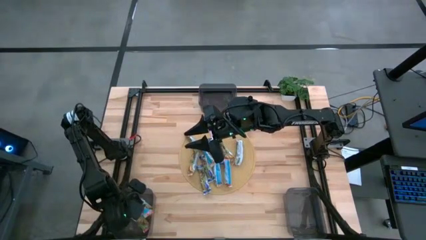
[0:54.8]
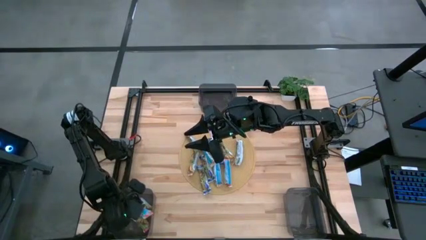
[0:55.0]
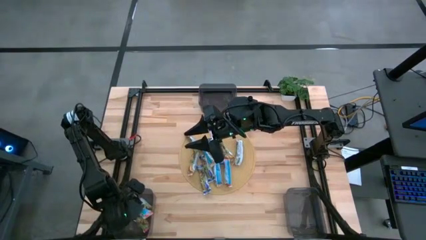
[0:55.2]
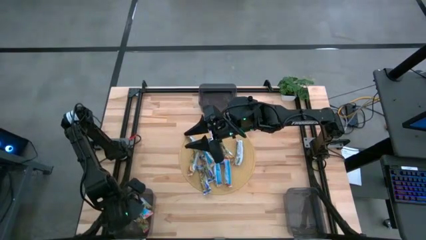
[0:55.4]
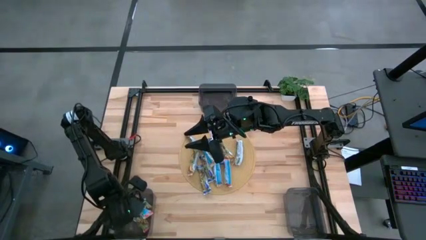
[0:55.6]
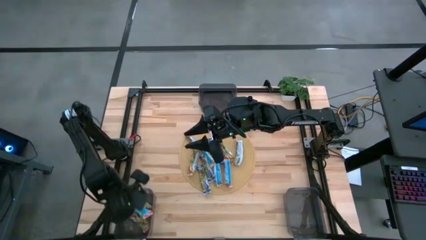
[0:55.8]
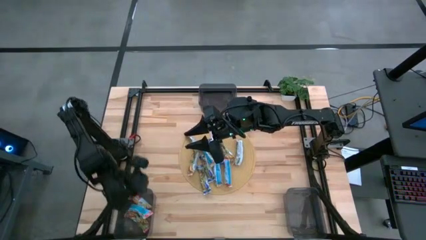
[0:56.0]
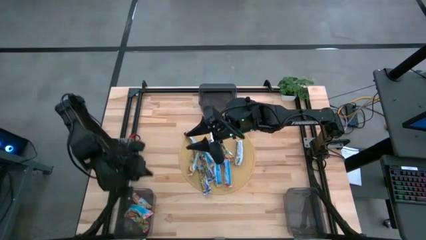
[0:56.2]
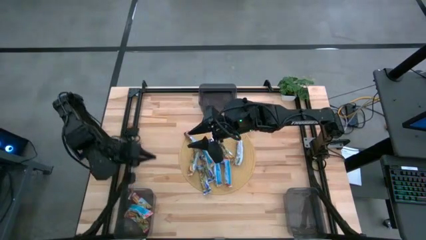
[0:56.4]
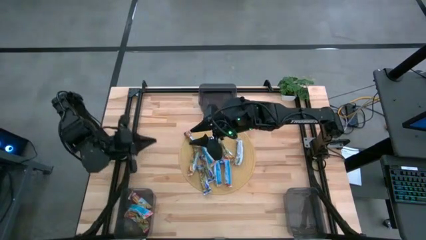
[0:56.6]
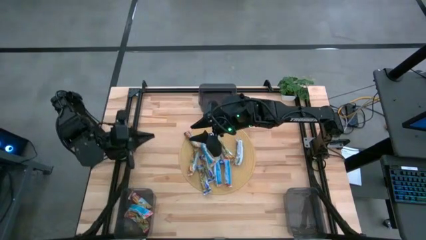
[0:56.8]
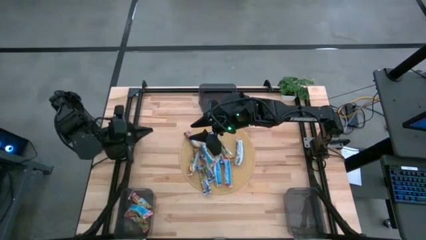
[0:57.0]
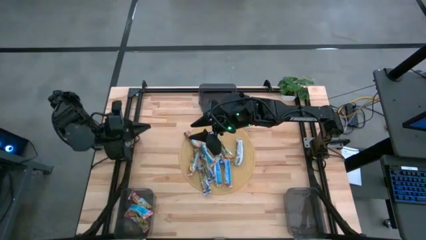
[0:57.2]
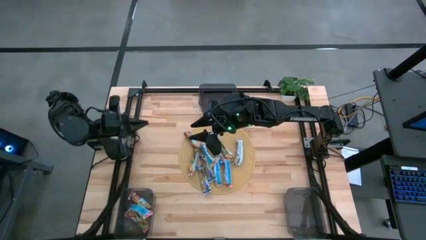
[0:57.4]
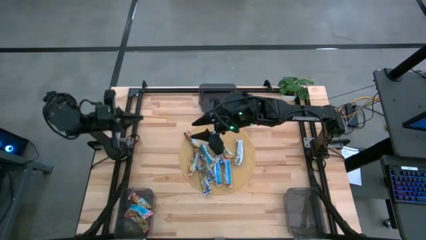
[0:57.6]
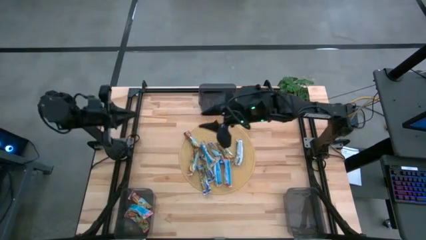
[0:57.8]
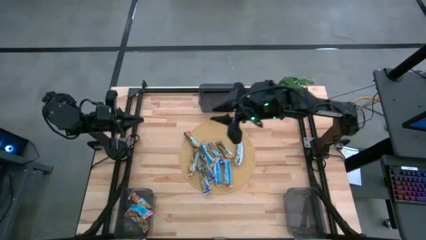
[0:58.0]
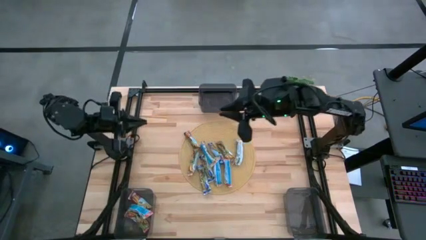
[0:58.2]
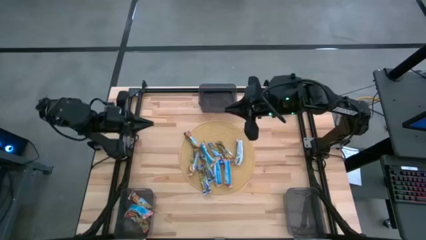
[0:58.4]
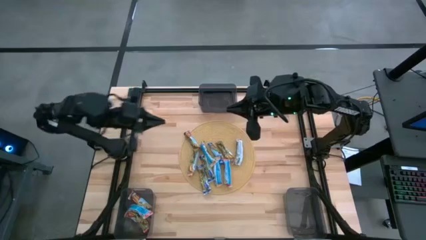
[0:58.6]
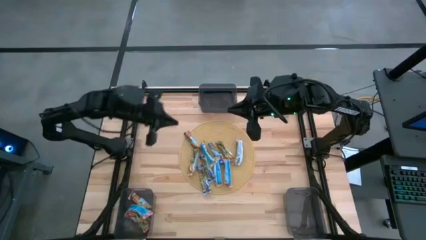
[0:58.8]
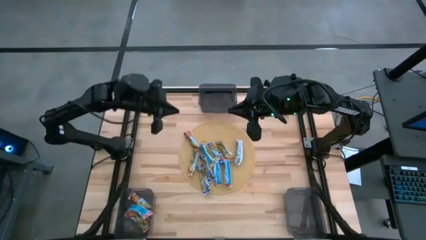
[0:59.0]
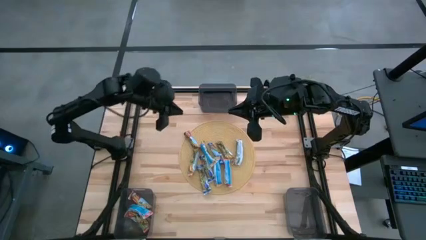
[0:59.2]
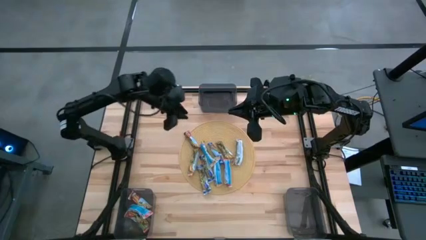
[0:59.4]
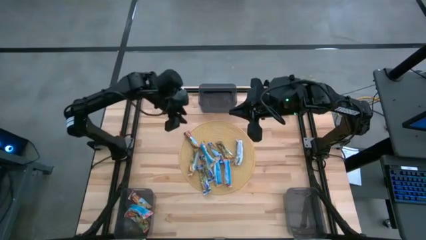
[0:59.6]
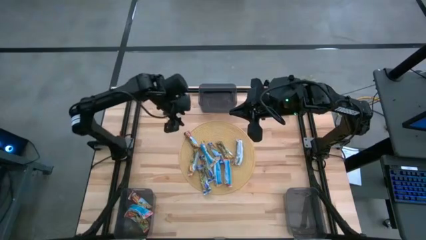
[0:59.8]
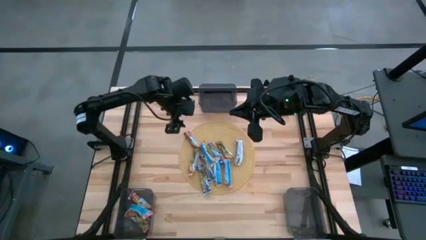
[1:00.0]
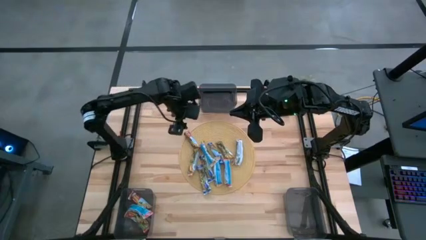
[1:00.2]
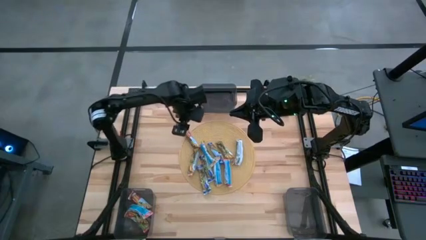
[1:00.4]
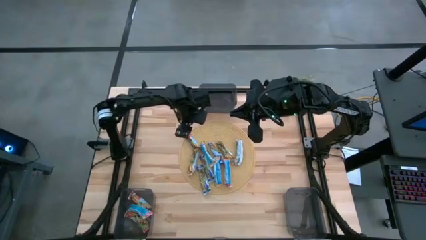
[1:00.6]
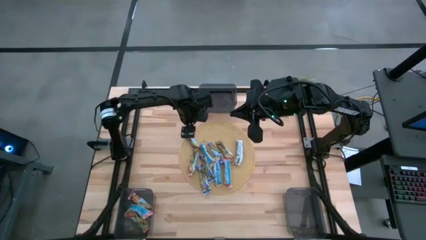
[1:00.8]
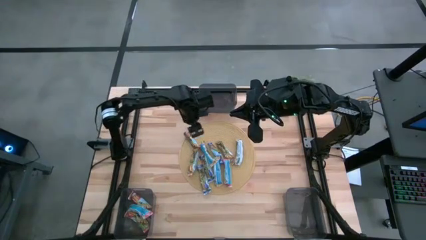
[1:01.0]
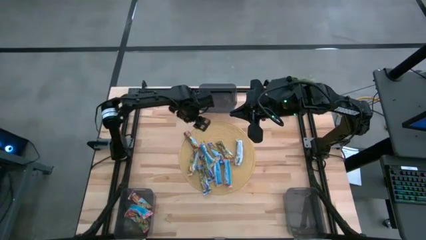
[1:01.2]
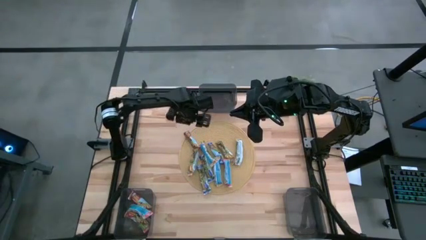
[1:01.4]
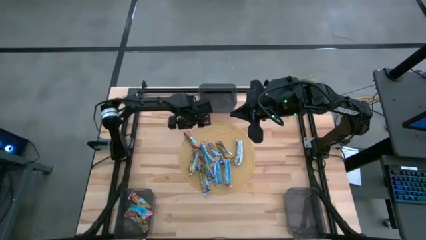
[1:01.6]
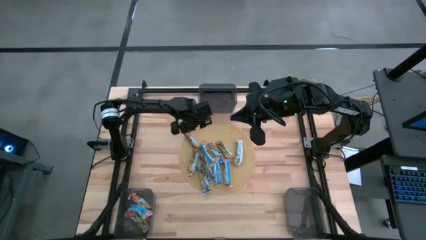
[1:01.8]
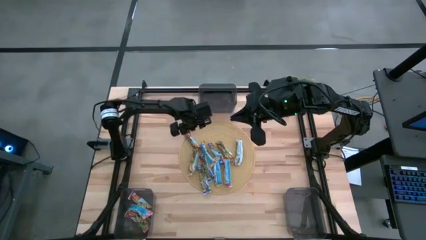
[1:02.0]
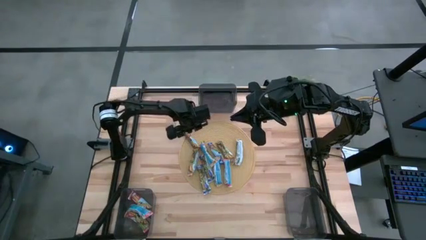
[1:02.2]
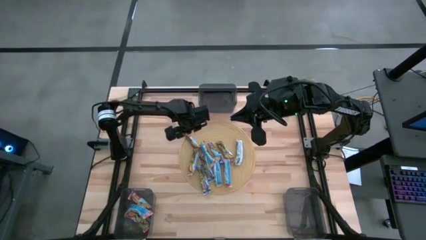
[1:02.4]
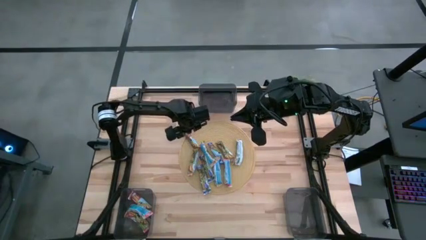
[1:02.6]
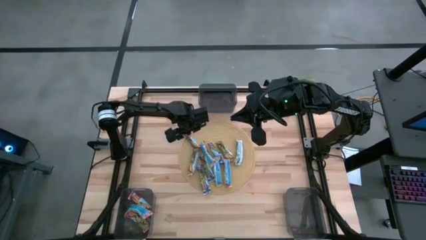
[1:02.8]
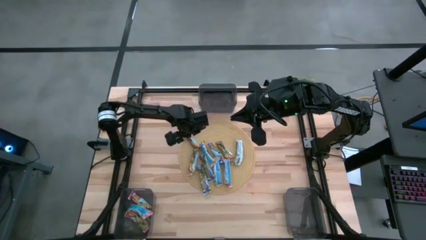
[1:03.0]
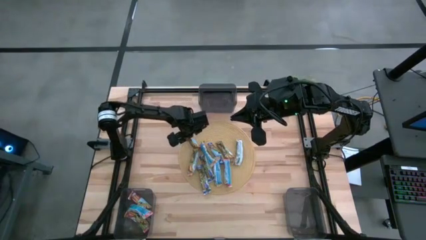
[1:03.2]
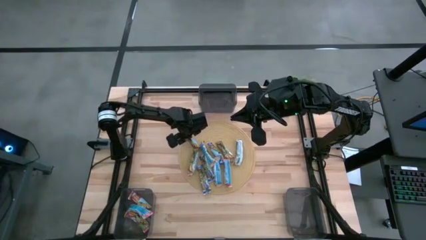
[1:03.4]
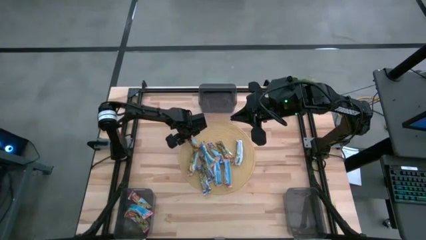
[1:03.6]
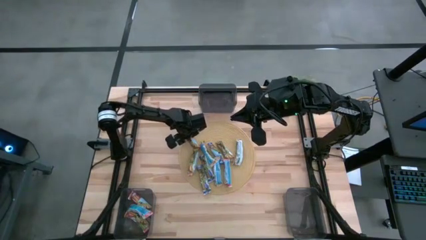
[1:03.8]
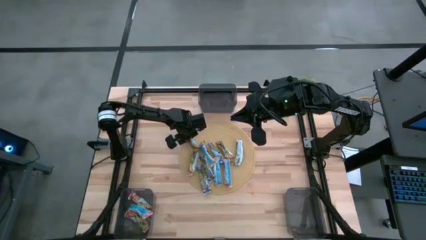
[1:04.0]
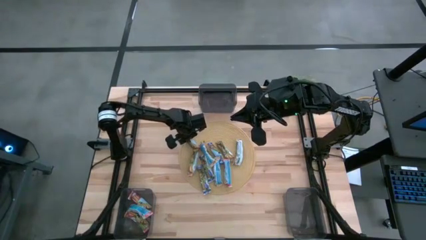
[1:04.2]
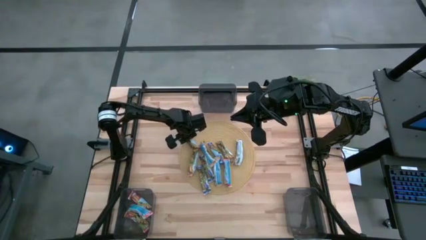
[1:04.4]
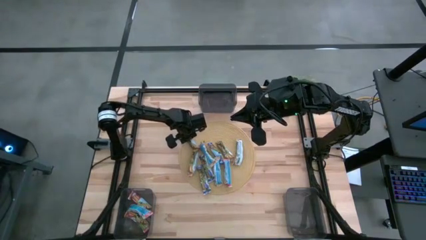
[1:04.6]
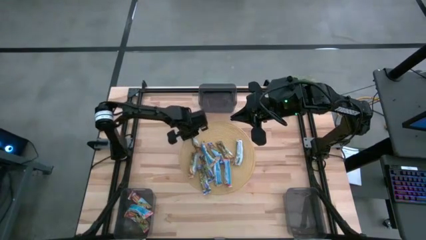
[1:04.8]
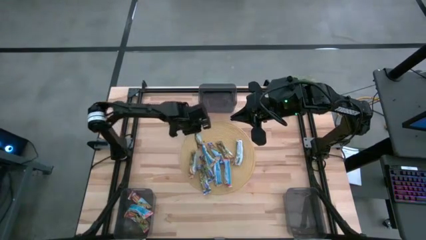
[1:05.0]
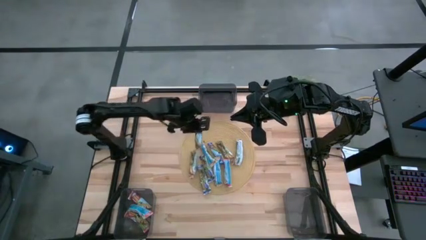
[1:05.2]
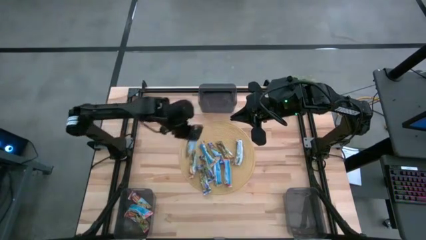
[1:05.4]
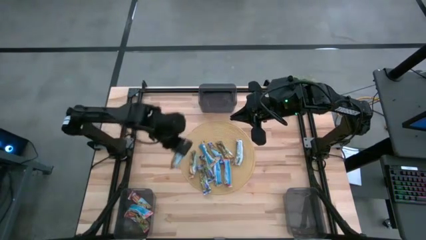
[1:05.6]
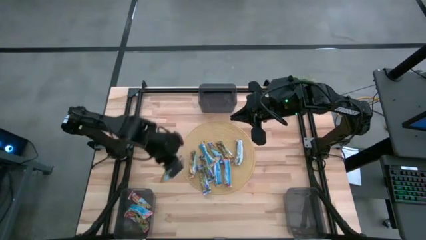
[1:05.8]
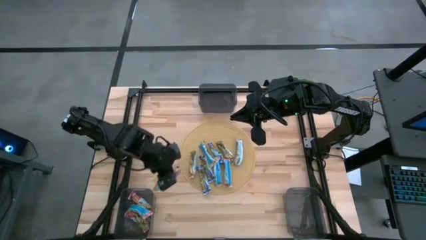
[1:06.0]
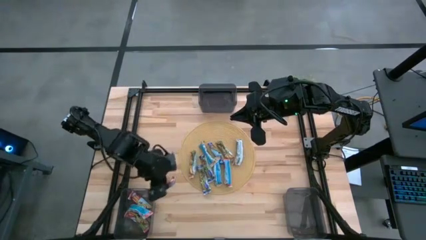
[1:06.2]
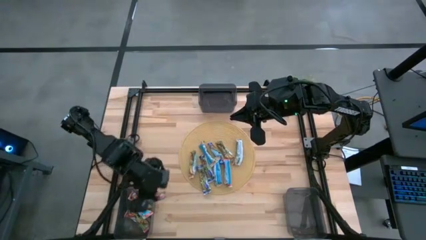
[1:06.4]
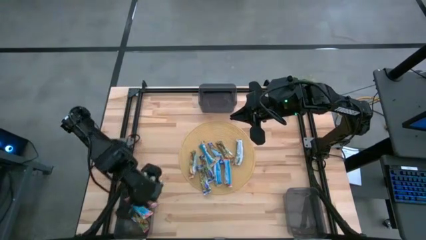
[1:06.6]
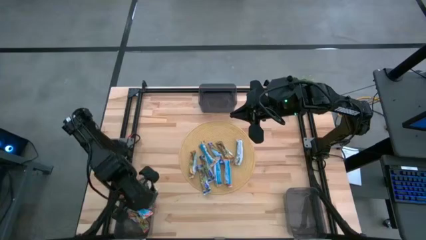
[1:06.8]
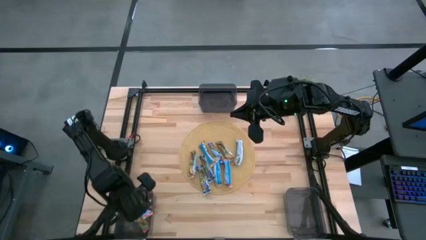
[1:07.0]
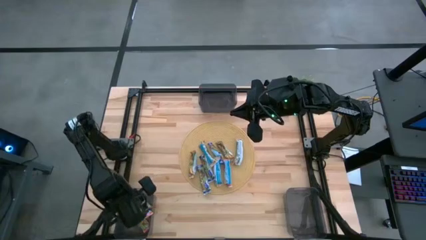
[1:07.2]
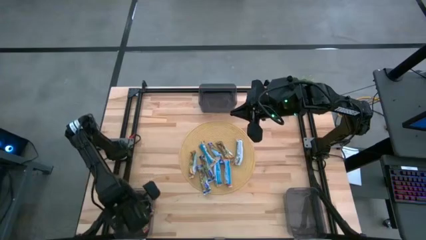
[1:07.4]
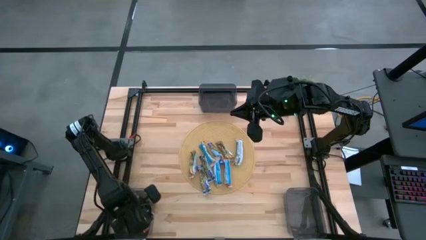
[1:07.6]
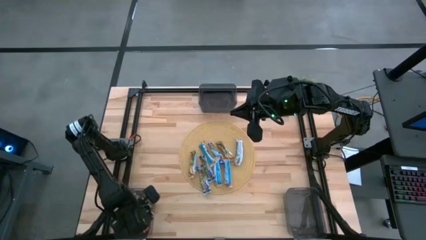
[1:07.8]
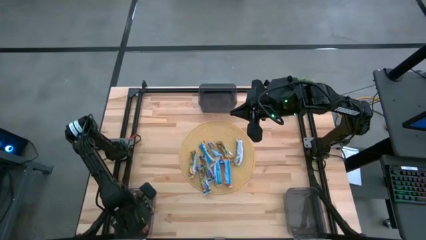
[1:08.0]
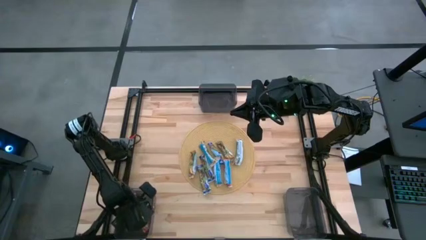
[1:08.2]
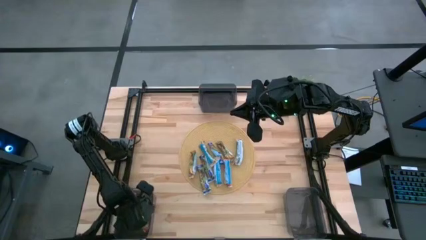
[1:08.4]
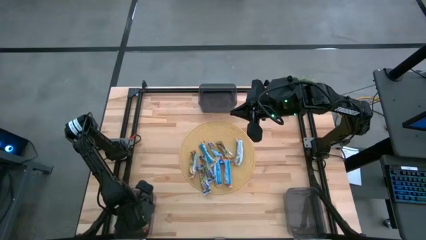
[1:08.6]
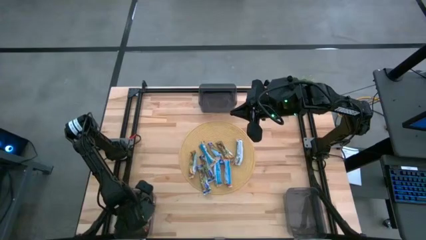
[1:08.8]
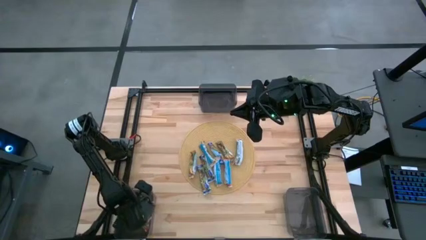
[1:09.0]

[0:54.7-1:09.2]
Task: Pick and place Granola Bars by type
Put the red granola bar into the left black bin

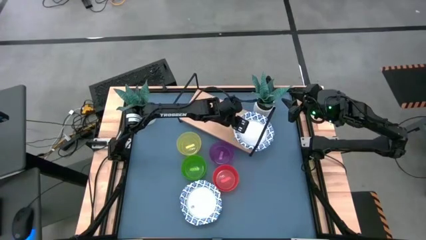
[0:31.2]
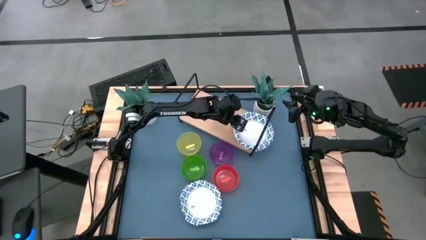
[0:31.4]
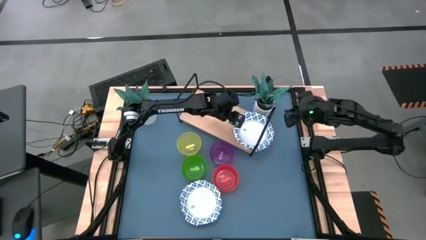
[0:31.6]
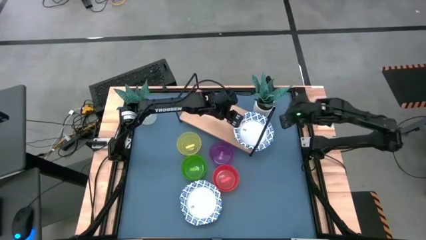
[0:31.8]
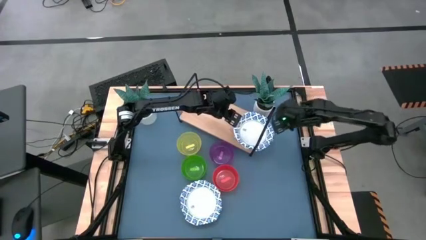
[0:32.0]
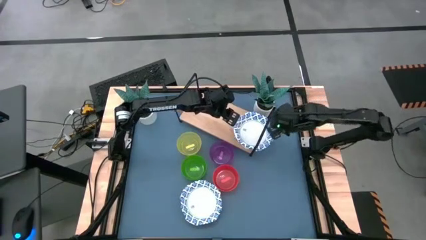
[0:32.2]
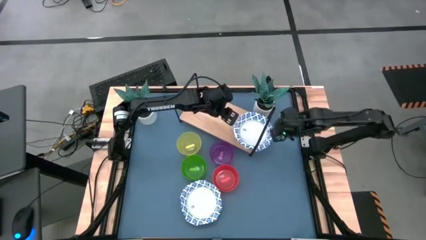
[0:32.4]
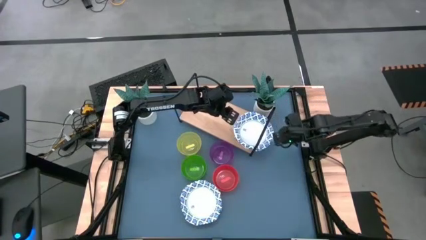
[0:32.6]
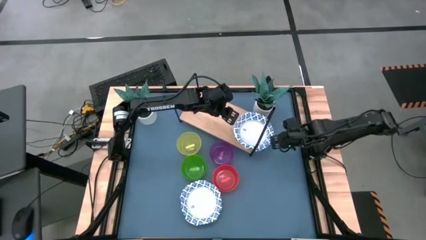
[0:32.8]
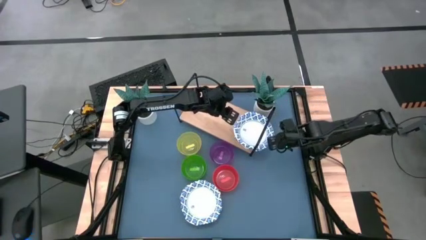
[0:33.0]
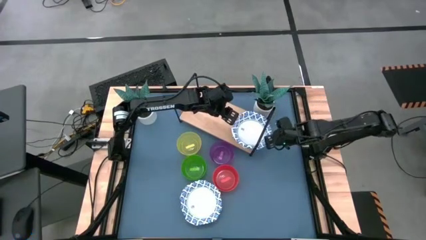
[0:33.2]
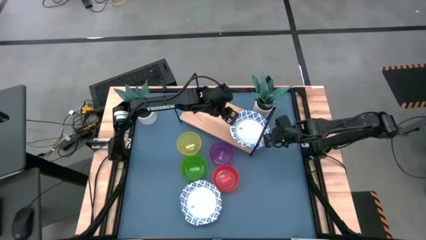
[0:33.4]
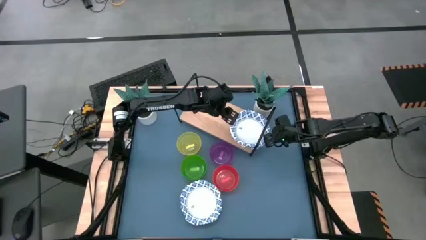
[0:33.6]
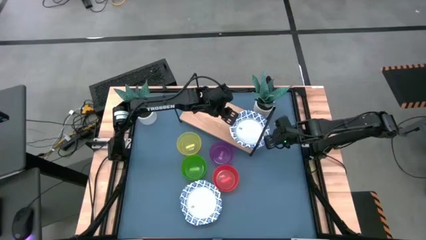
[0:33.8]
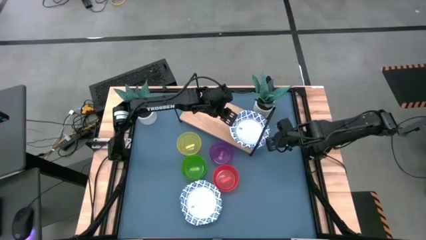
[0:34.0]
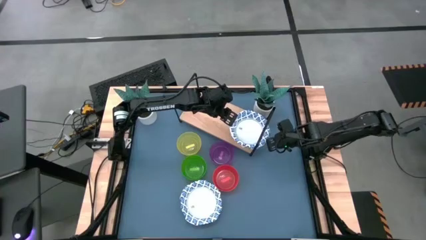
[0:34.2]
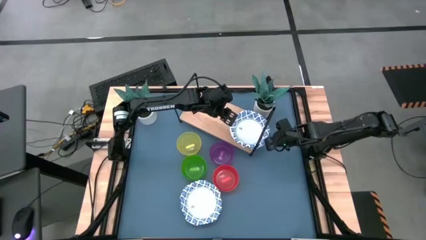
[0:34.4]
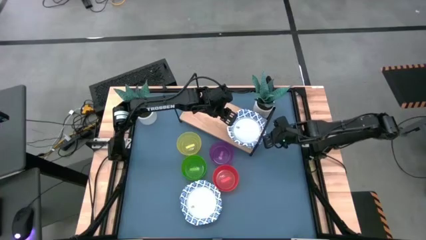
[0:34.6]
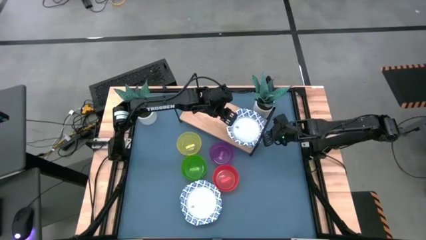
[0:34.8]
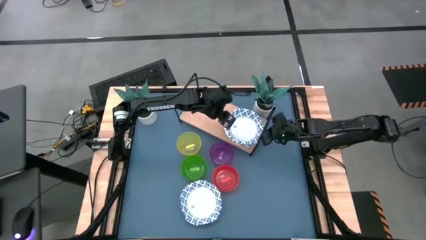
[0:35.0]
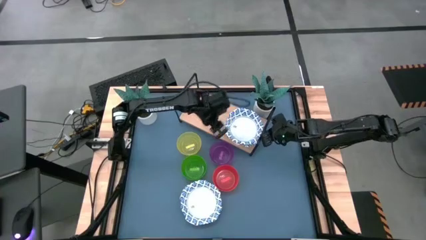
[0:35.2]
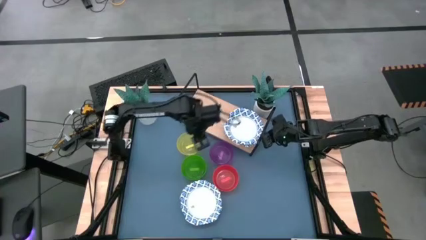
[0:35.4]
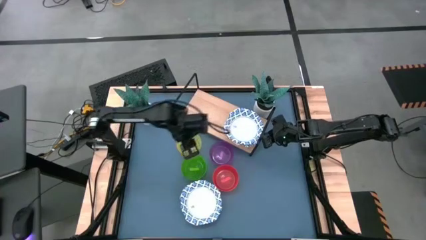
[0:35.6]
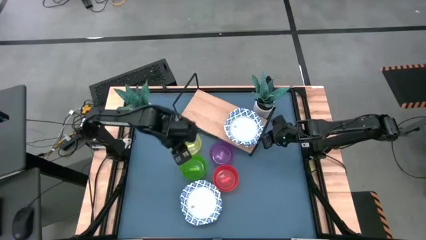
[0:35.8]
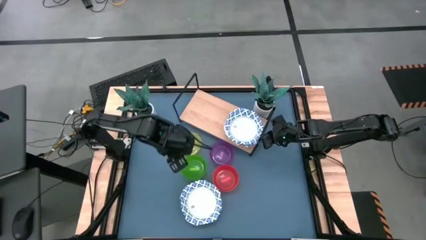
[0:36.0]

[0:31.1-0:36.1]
Task: Place and stack bowls onto a shelf
Adjust the stacked blue pattern plates on the shelf
